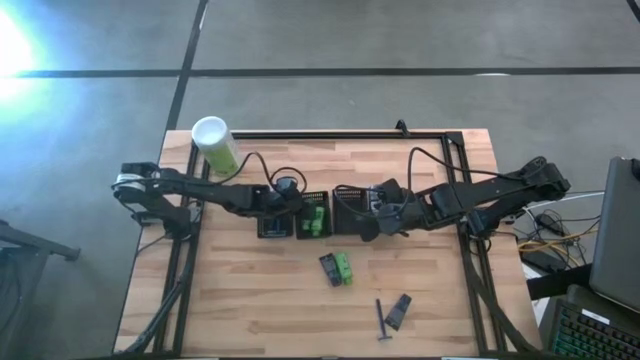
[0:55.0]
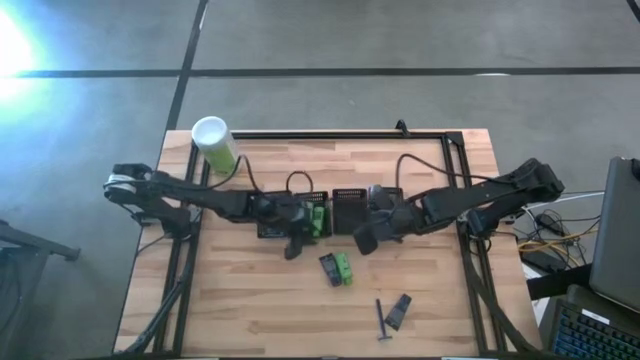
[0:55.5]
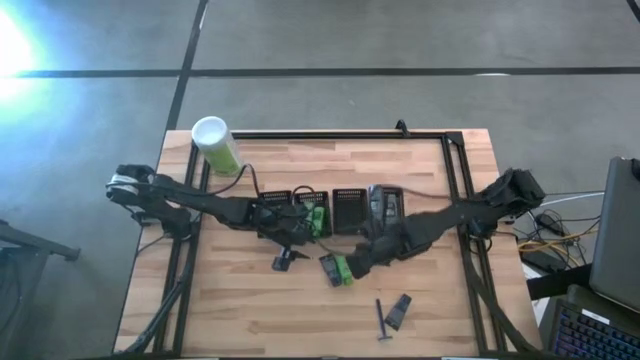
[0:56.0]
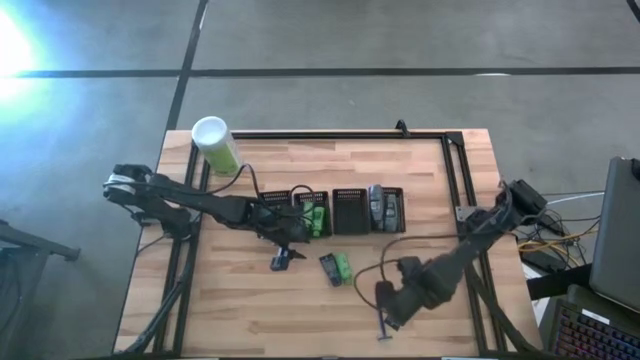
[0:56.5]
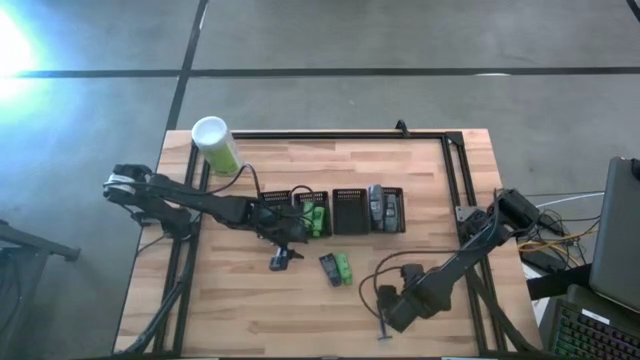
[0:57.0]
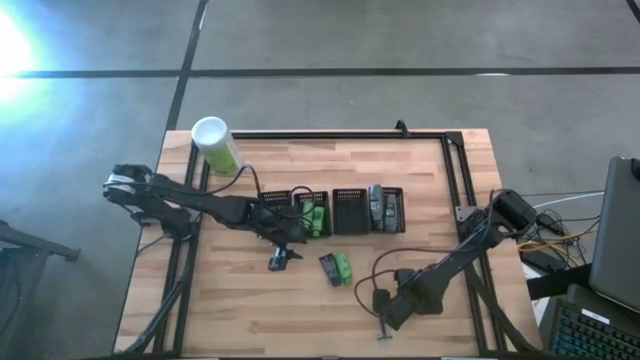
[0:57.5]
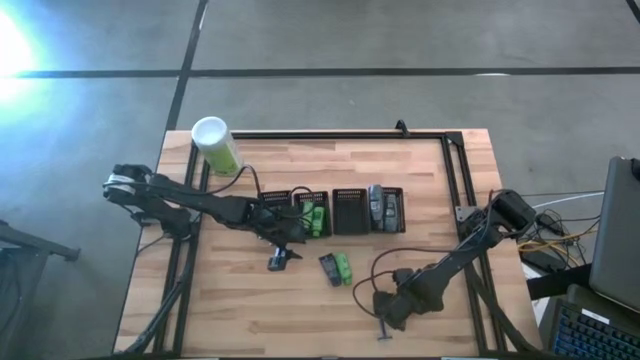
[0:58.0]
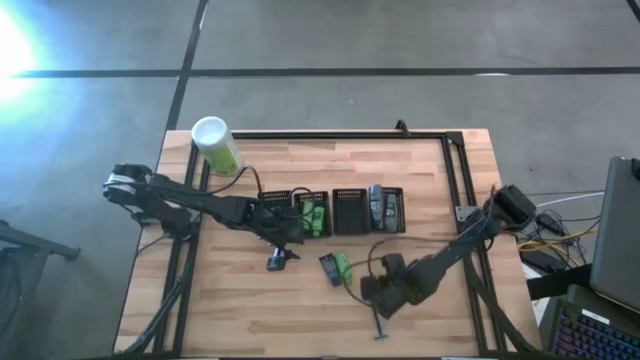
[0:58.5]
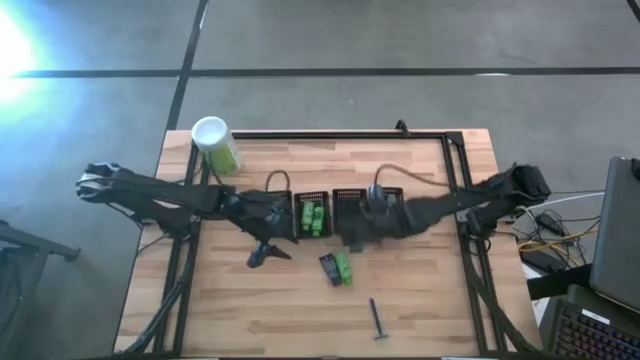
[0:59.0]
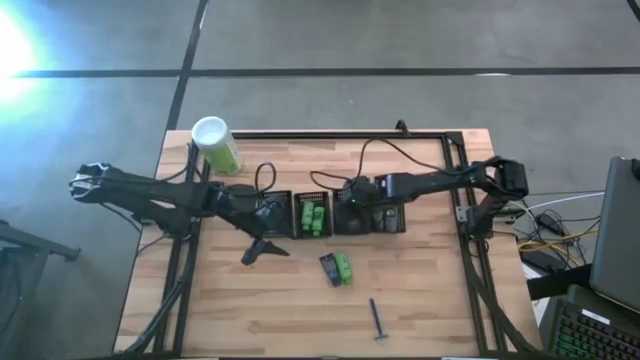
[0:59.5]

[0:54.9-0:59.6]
Task: Pick & Place Travel size toiletries
Put the blue shave cream into the middle right black basket

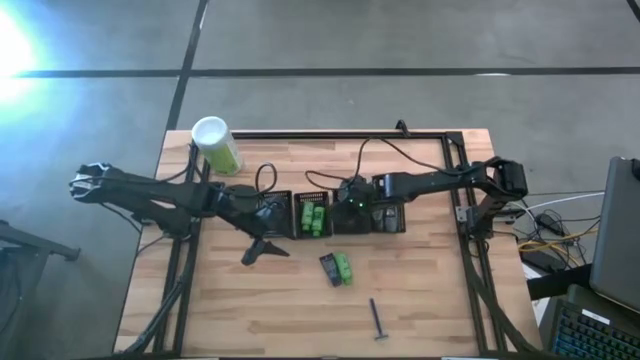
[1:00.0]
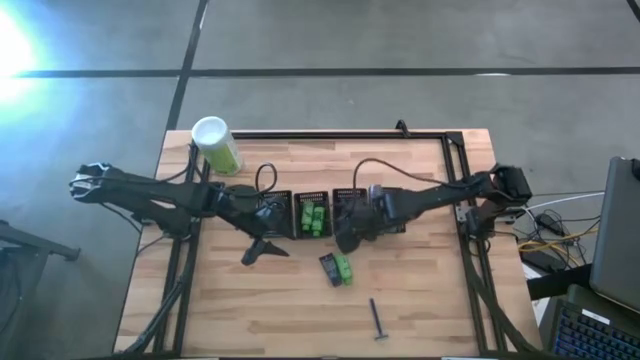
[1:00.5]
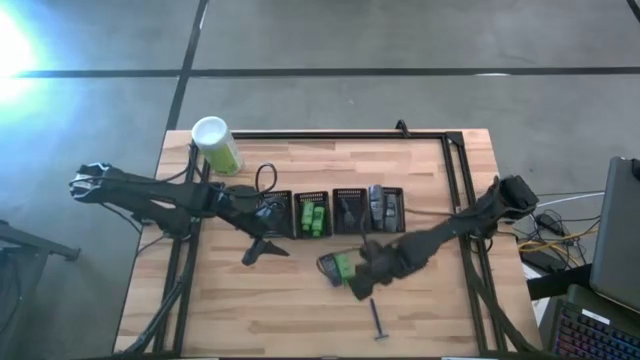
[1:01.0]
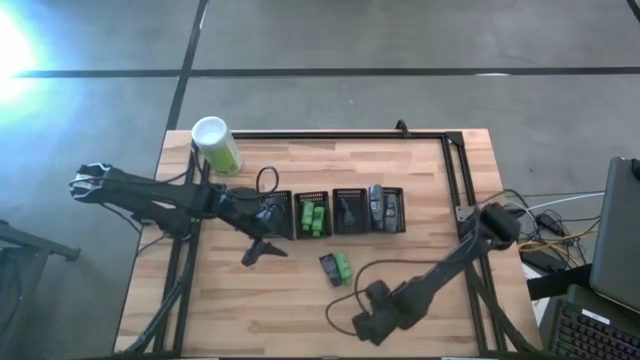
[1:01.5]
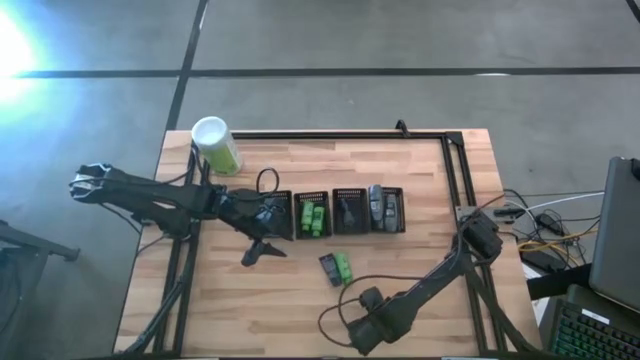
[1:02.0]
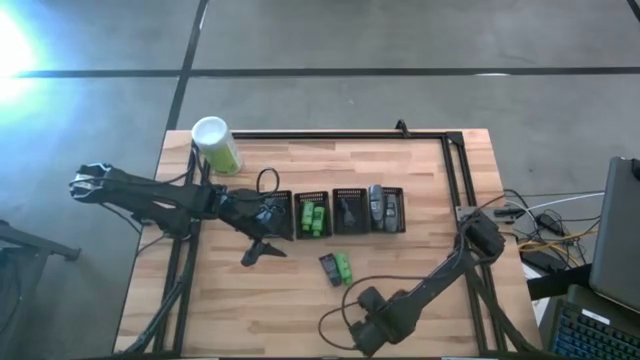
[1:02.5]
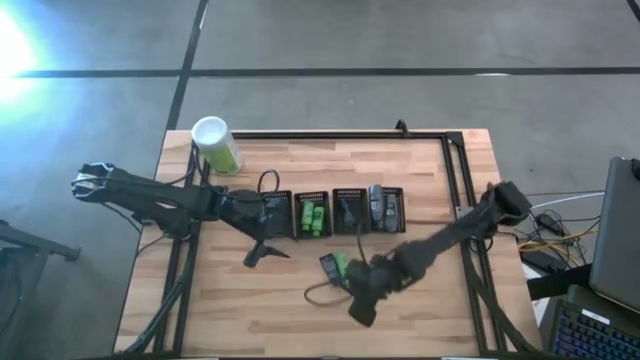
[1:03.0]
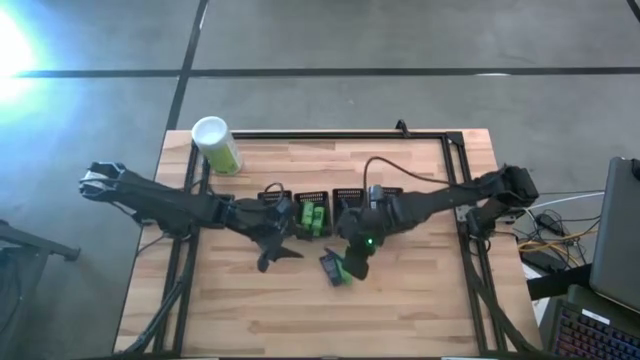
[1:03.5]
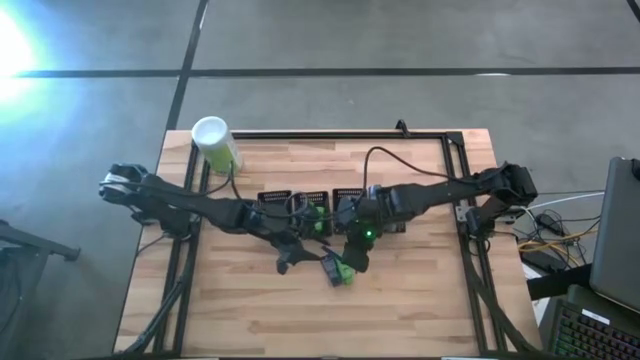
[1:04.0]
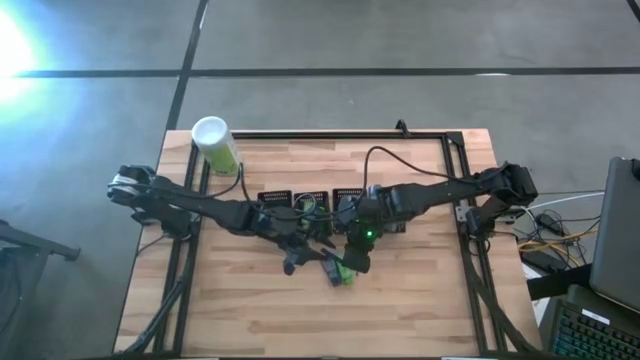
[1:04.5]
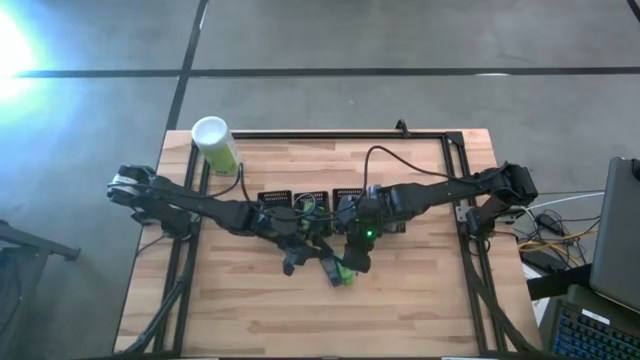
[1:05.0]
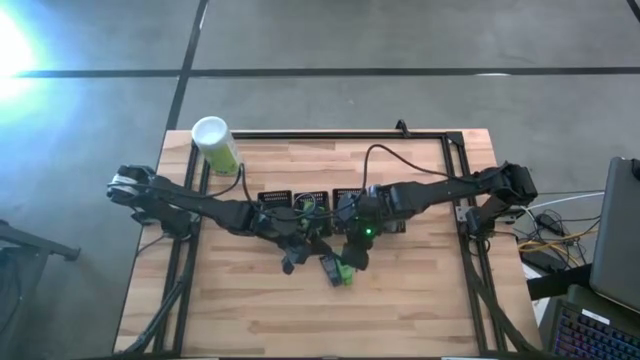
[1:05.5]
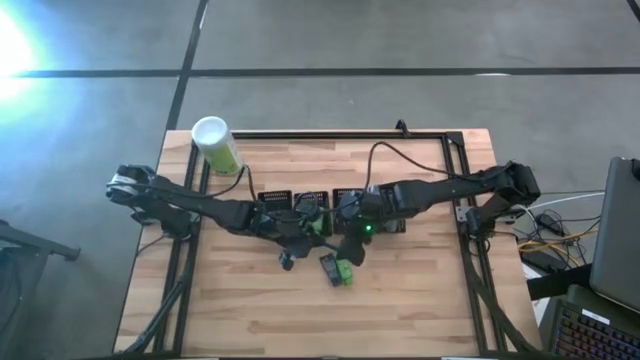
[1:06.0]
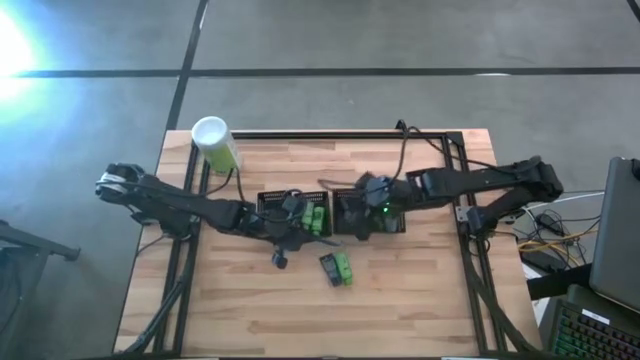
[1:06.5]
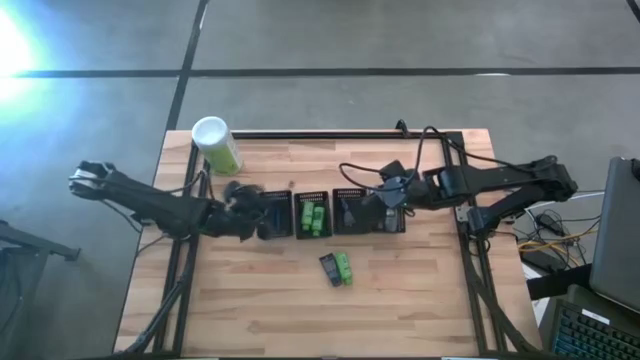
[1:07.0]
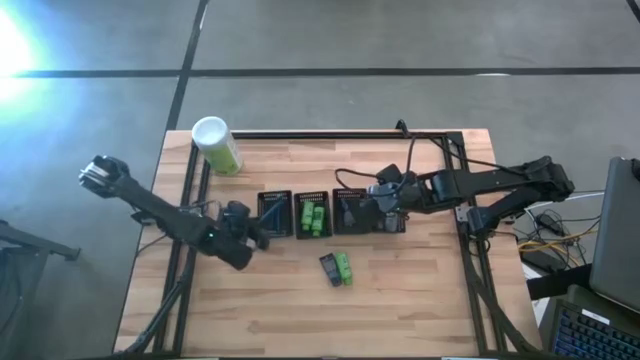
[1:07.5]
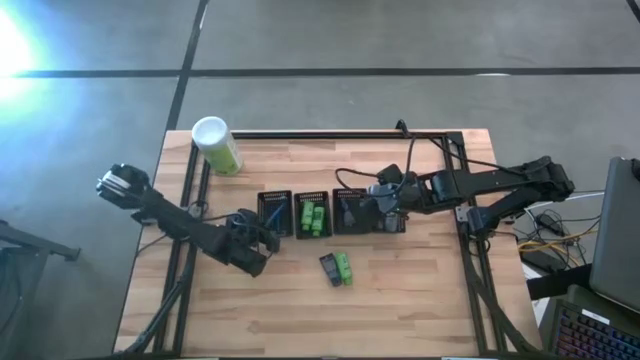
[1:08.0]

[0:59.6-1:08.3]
Put the blue razor into the left black basket

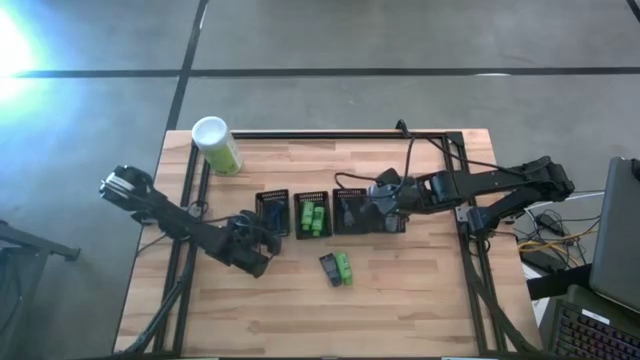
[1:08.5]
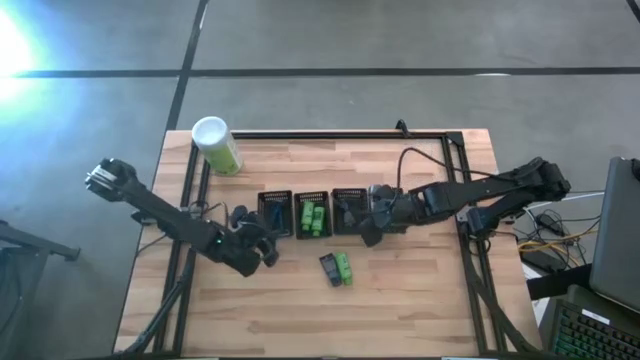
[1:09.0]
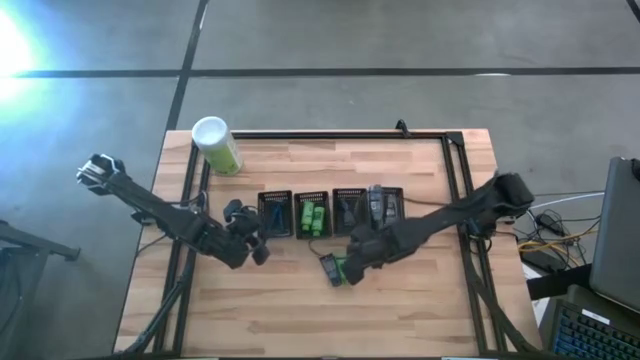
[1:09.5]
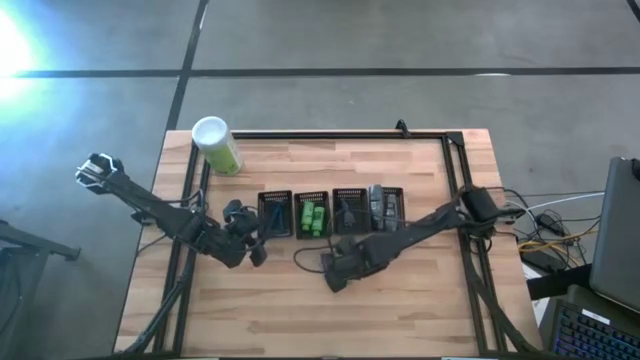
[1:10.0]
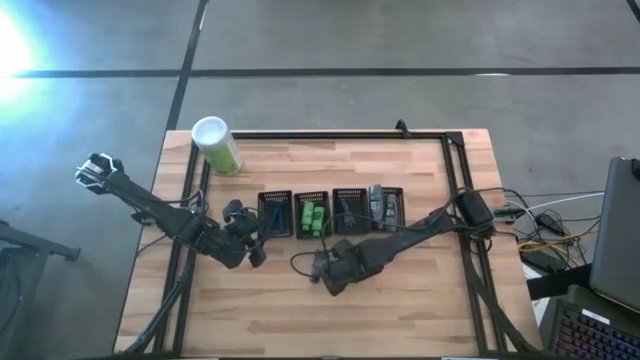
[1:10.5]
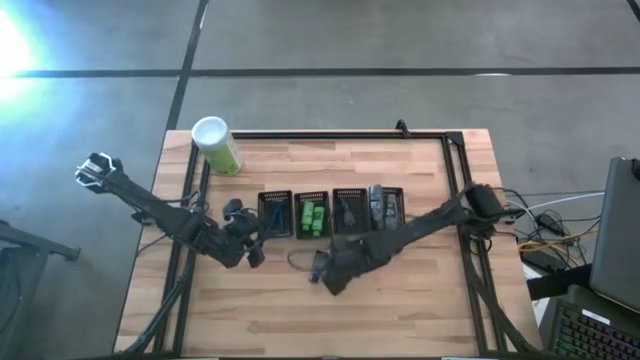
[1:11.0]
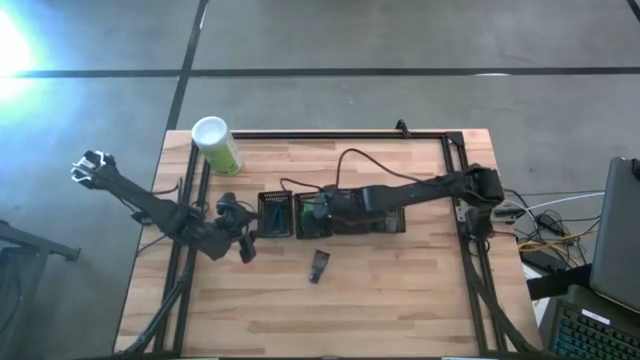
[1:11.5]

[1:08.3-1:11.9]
Put the green shampoo into the middle left black basket

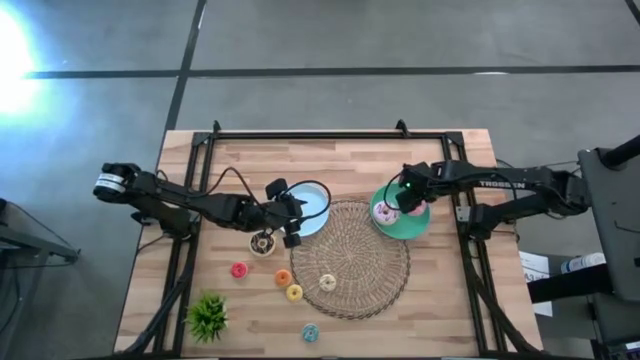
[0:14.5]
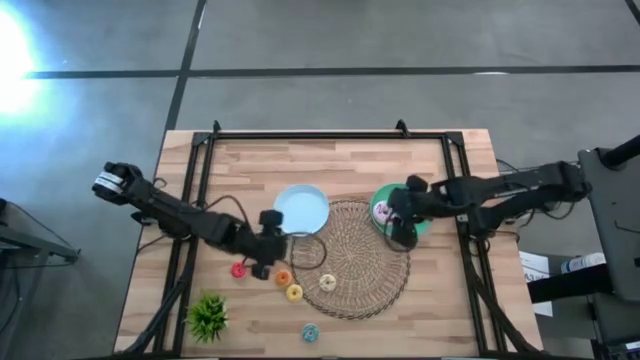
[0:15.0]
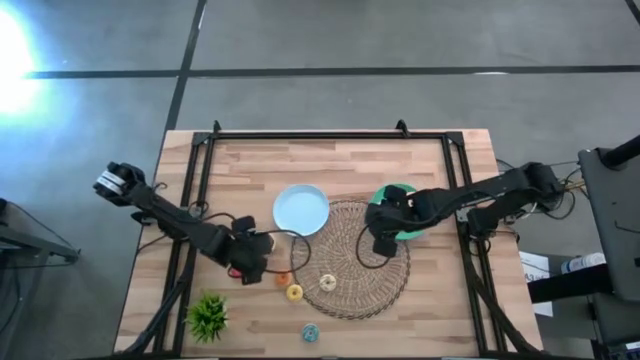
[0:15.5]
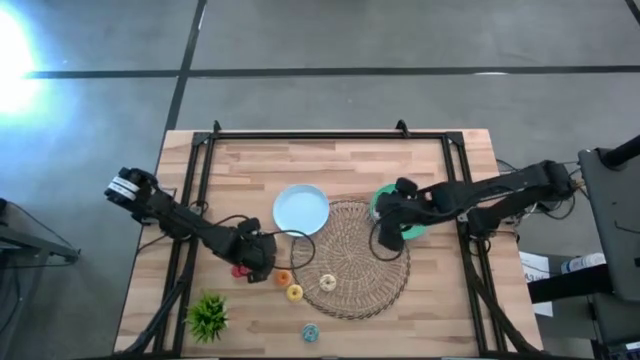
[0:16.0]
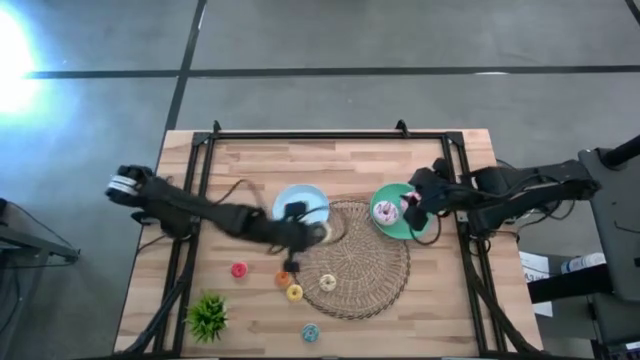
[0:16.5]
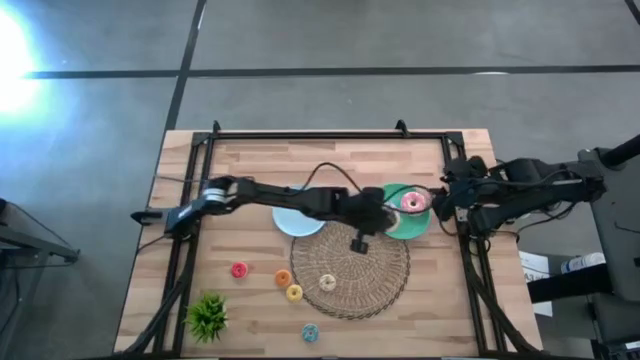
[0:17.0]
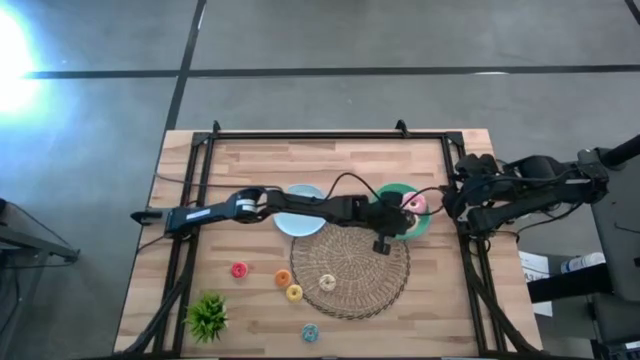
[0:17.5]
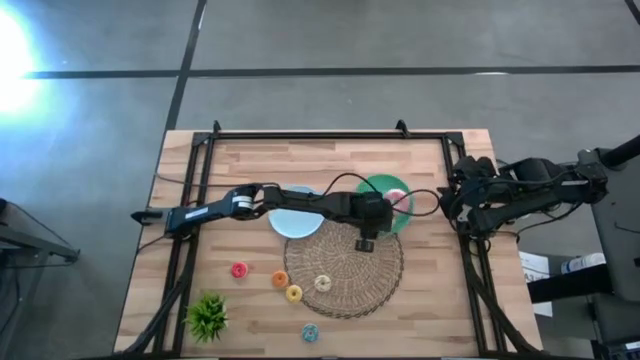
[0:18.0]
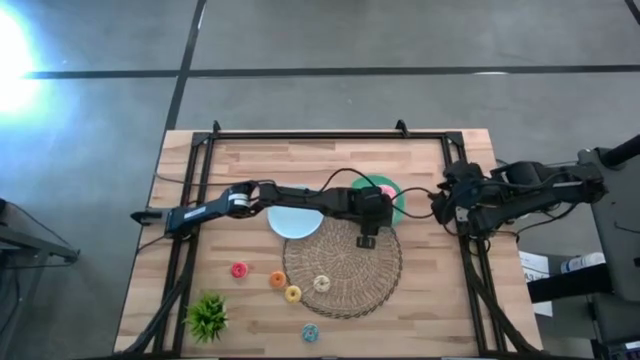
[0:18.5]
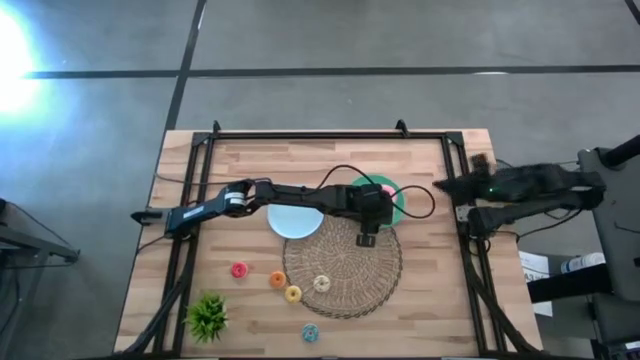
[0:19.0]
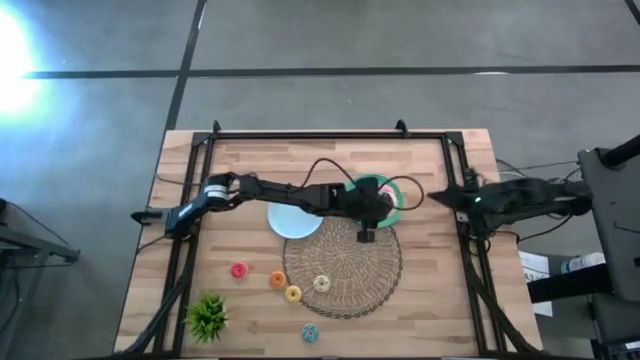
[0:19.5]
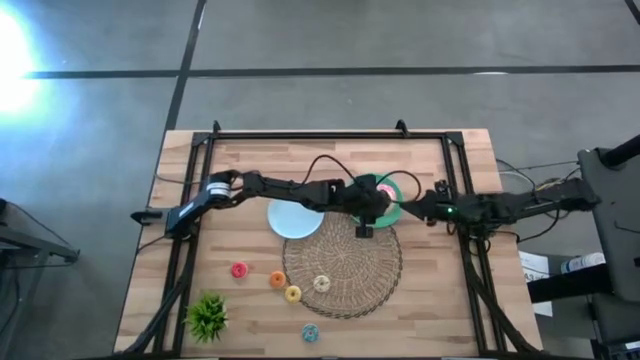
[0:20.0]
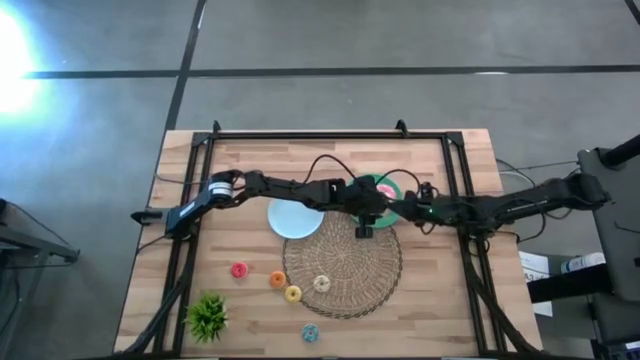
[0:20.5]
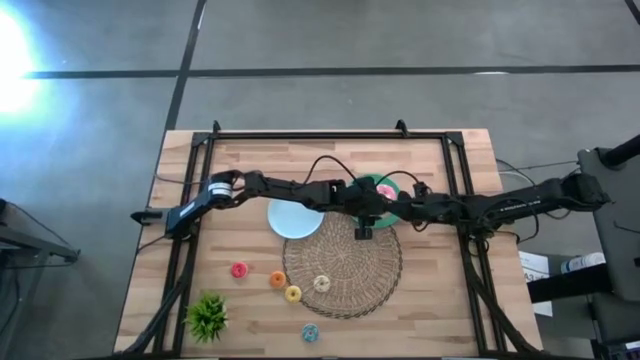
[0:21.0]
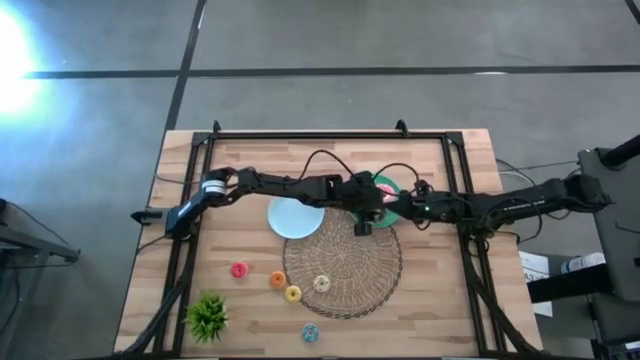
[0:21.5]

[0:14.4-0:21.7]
Task: Pick & Place donuts
Put the big black donut on the green plate
